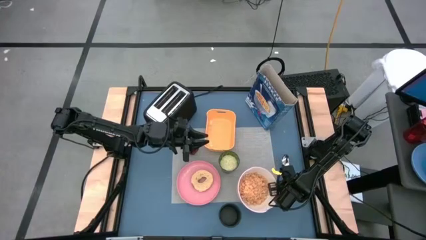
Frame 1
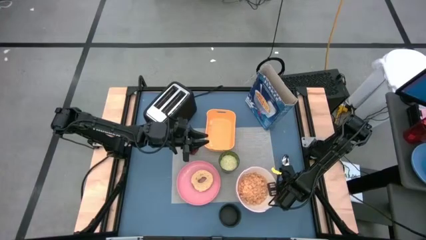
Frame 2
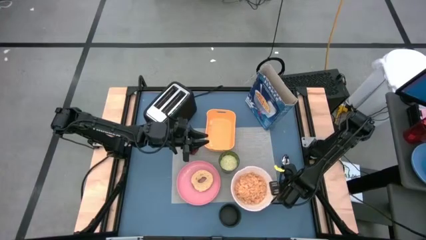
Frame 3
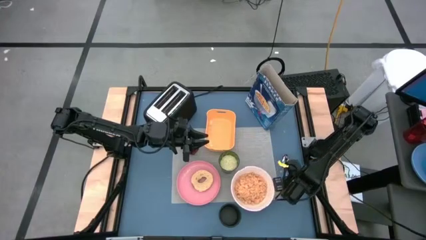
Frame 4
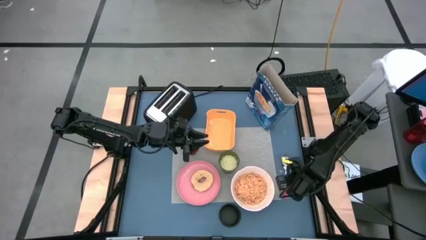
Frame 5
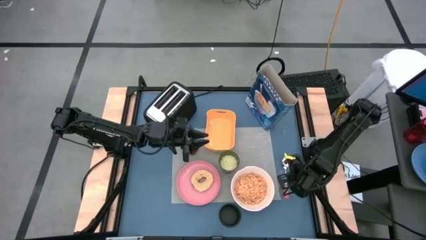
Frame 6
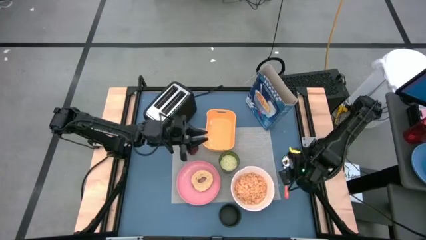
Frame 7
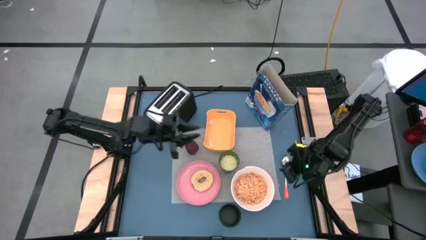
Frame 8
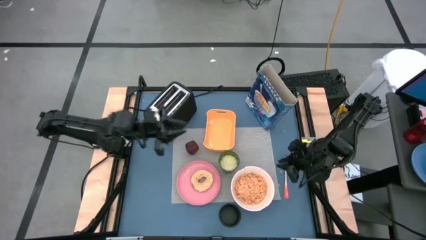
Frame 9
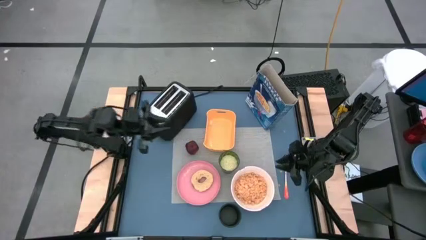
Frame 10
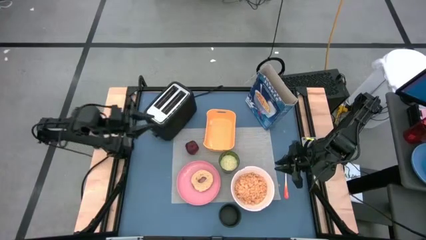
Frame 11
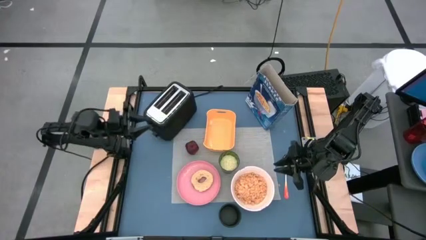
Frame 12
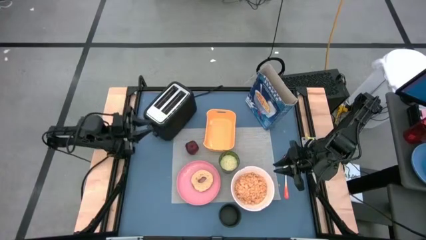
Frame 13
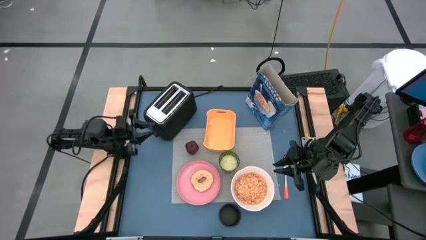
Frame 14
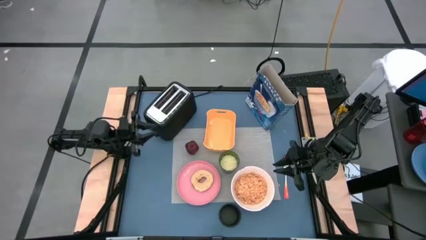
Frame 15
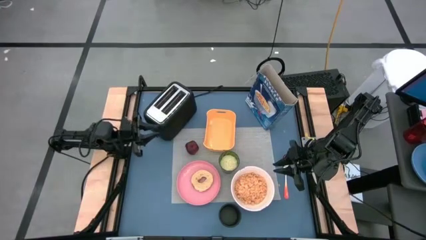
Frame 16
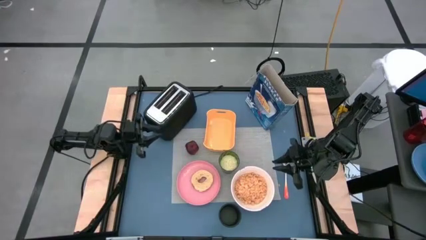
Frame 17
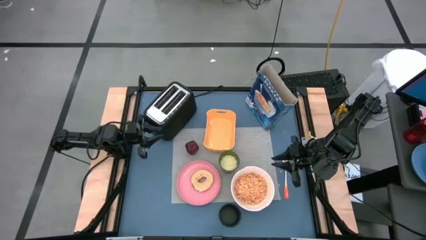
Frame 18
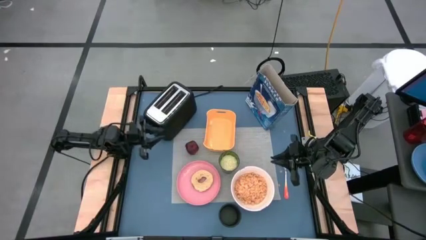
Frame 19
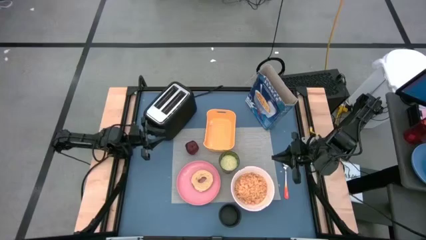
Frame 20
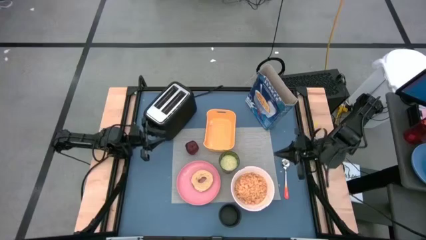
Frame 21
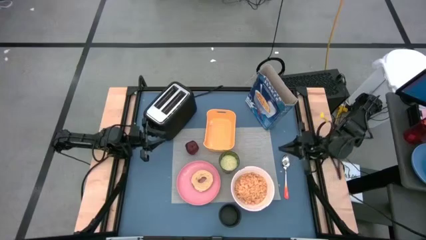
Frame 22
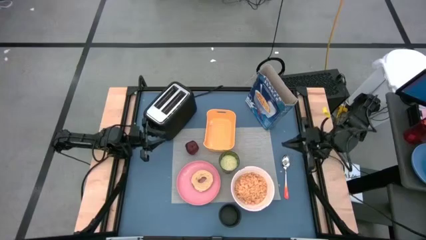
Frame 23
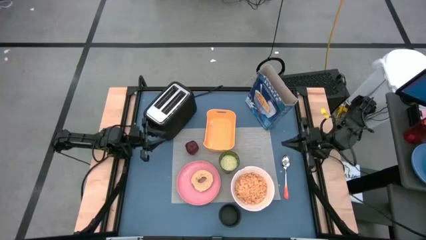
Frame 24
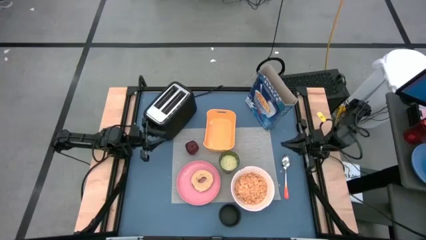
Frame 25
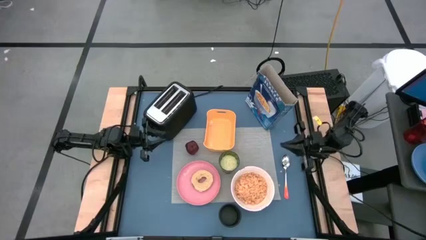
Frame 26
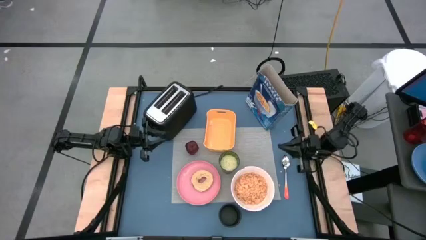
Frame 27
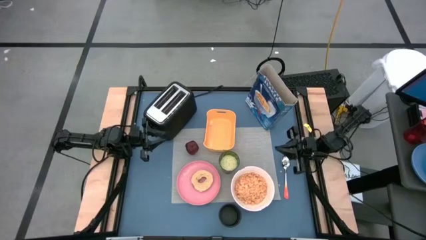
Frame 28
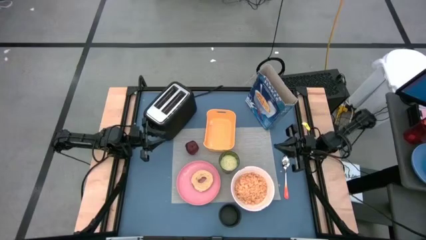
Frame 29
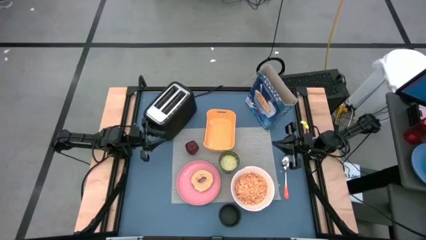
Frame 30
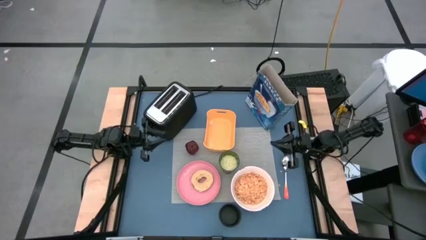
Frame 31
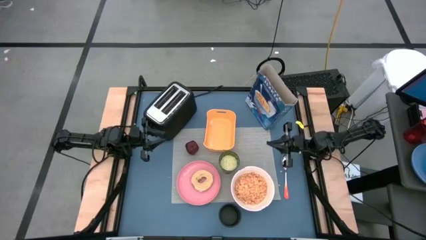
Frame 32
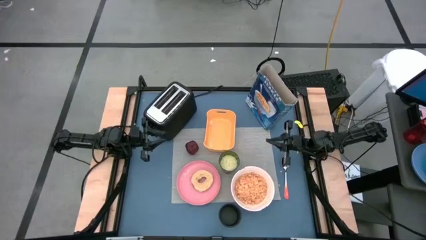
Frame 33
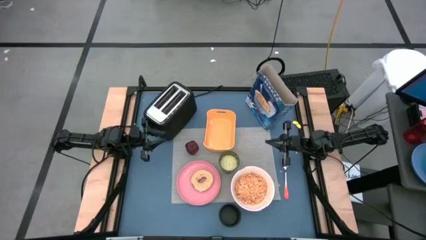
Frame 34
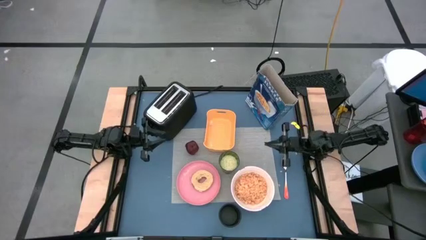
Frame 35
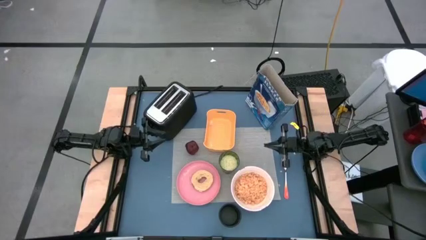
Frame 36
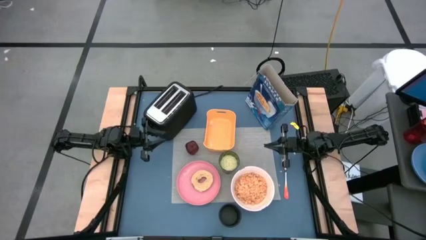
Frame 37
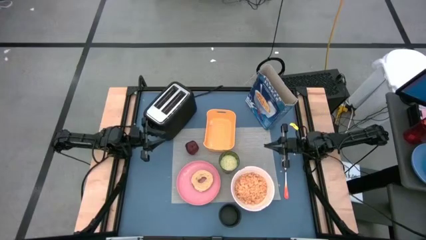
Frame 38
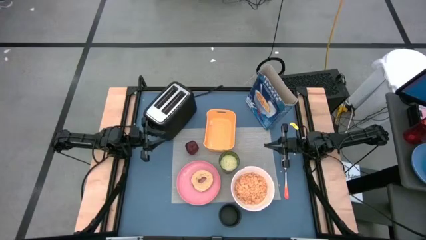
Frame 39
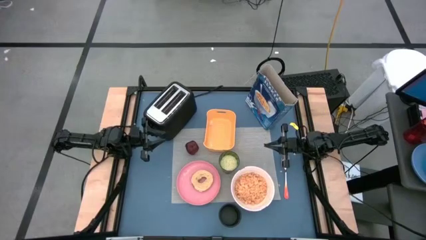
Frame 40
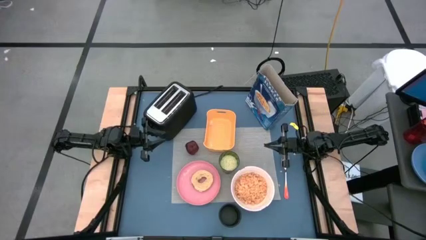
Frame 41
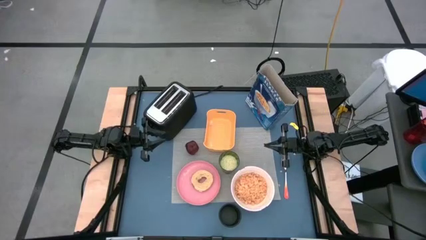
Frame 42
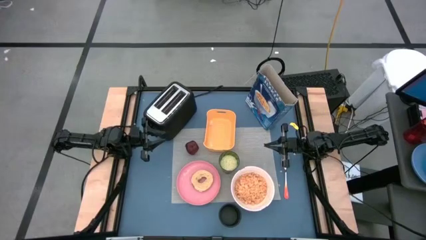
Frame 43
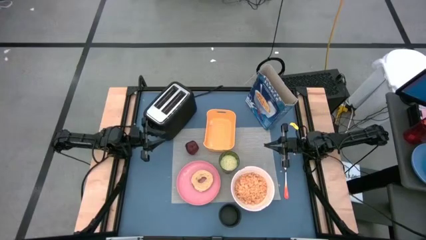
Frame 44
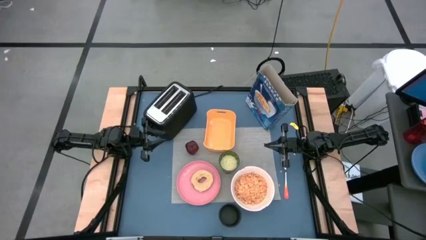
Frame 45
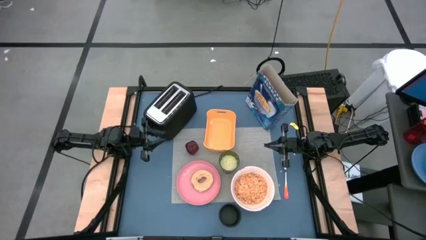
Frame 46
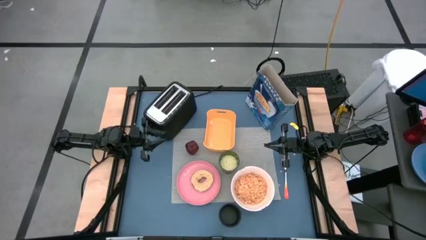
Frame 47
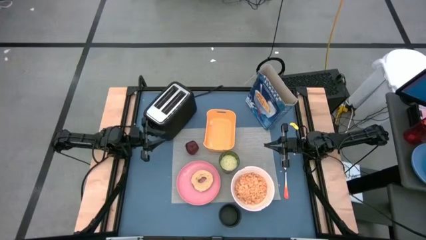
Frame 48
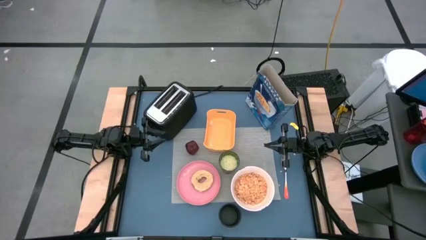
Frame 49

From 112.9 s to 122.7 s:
Task: Arrange a breakfast setting
Return to Home Position
